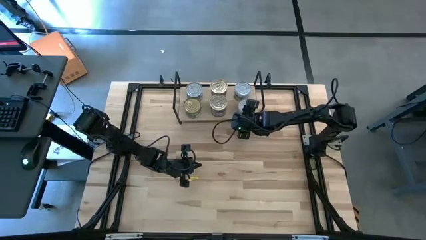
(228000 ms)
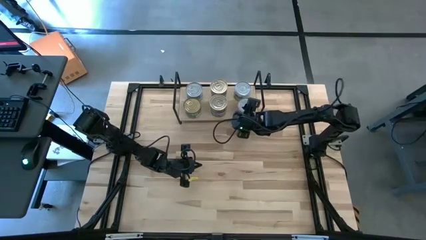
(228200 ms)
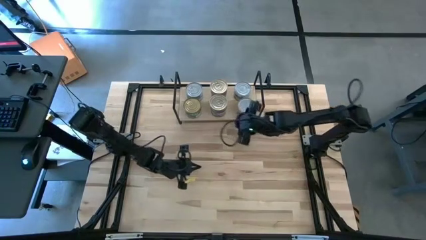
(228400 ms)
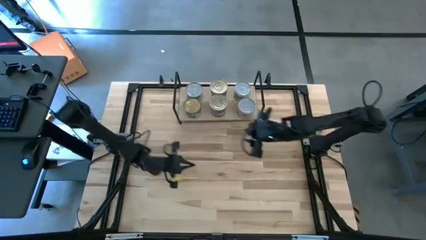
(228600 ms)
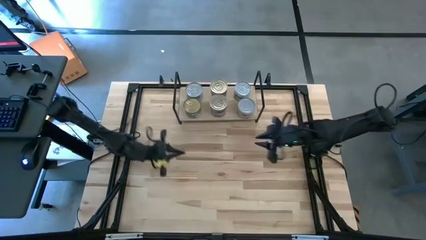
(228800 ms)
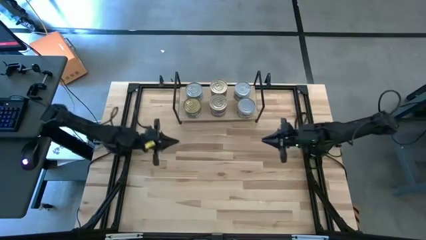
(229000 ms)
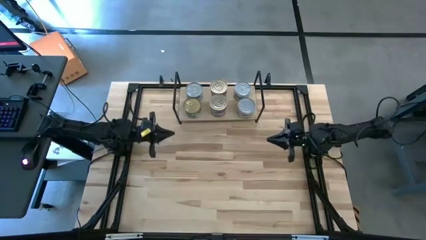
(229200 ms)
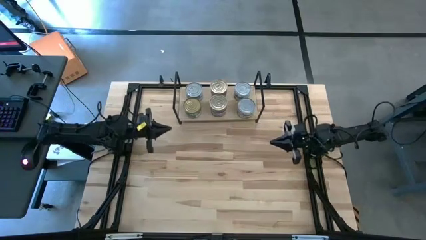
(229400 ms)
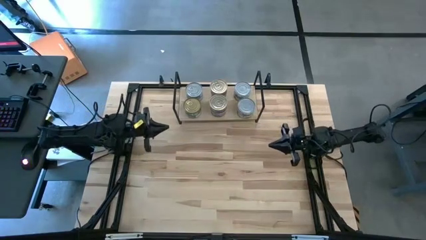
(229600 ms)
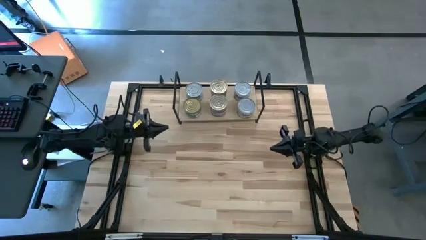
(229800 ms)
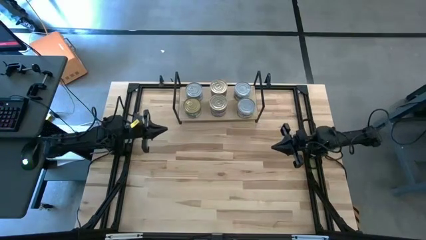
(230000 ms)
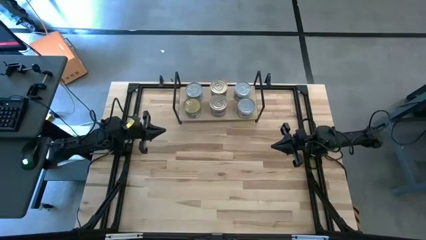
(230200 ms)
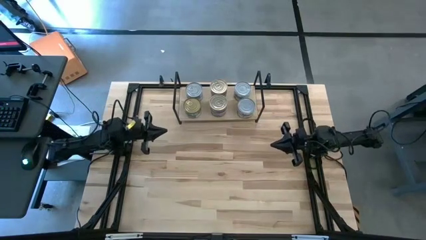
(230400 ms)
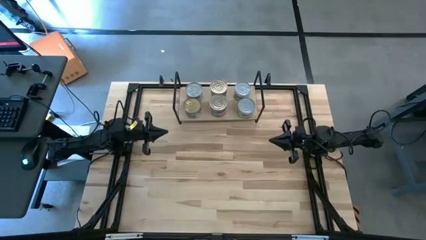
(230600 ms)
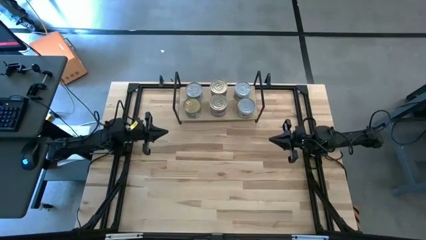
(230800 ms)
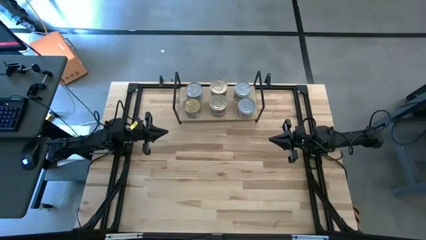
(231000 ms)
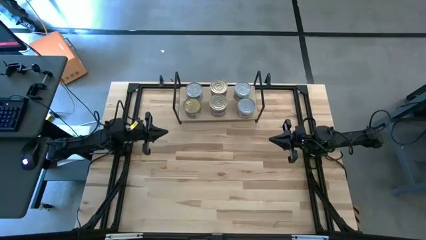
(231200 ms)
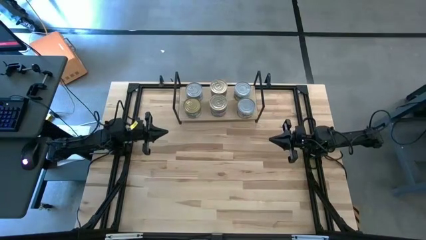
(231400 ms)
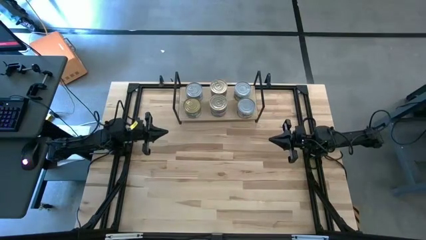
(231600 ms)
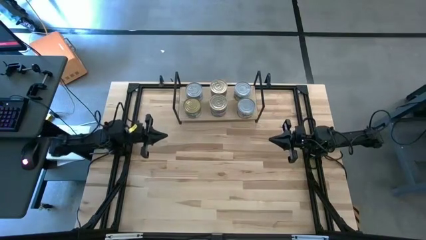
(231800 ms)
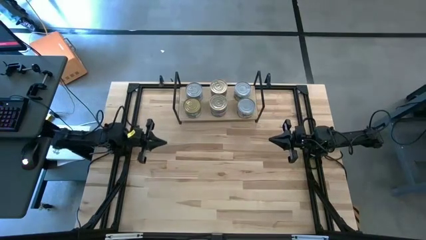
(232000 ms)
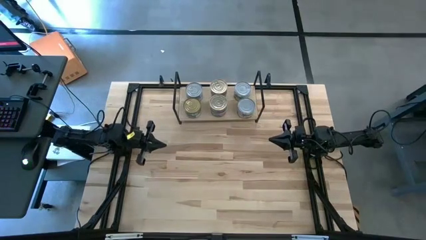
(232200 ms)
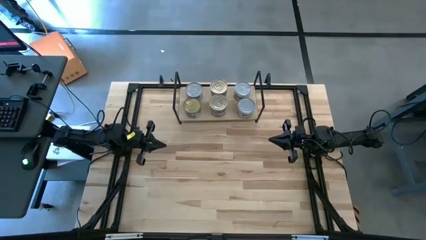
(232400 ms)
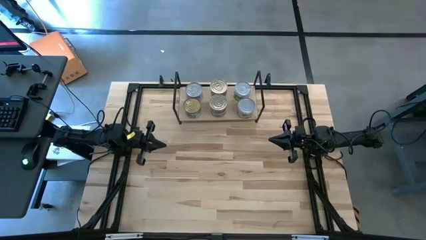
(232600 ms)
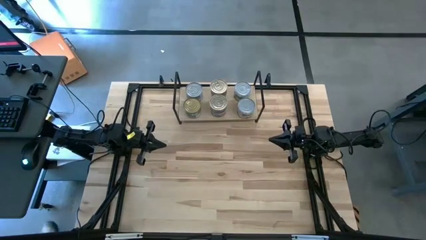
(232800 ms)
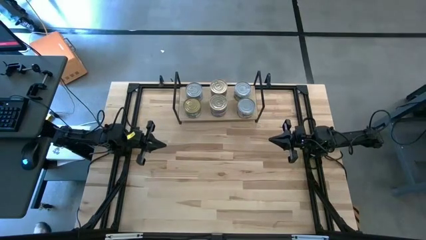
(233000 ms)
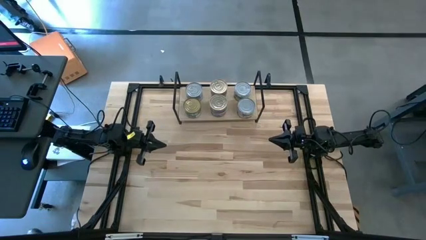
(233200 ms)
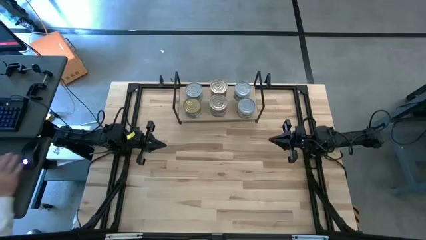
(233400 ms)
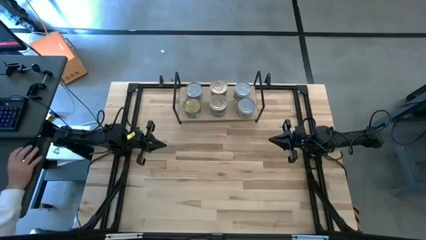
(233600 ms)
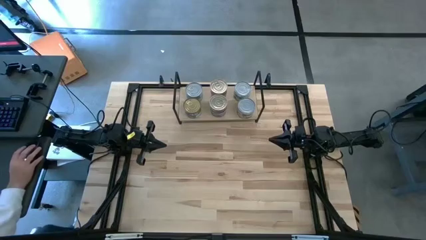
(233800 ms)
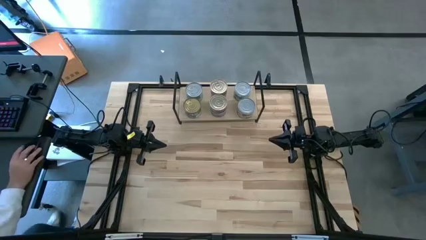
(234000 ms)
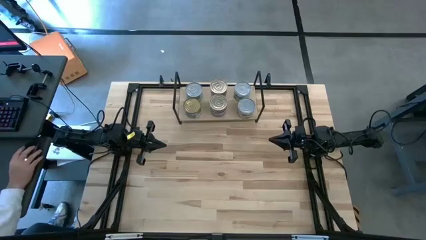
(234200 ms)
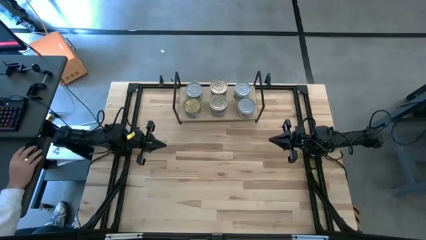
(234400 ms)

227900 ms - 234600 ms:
Task: Stack canned seafood by type on shelf
Return to Home Position

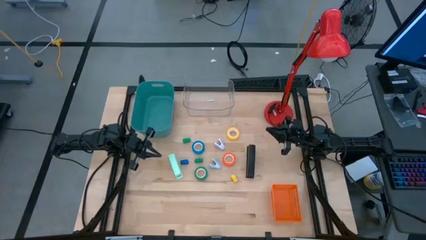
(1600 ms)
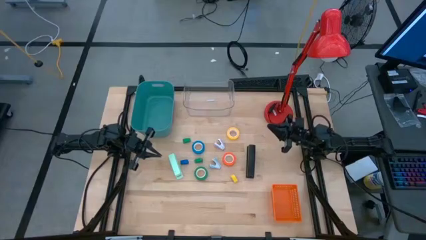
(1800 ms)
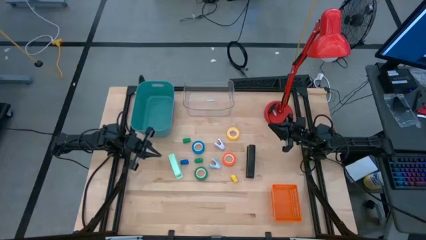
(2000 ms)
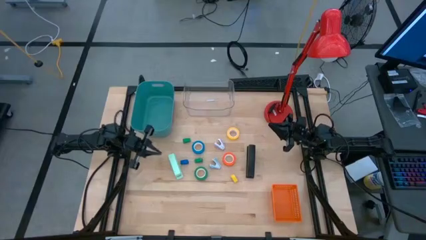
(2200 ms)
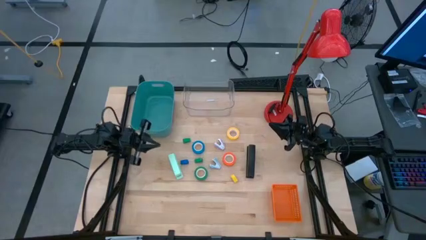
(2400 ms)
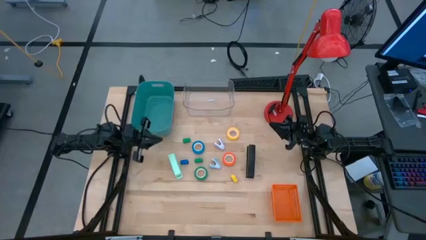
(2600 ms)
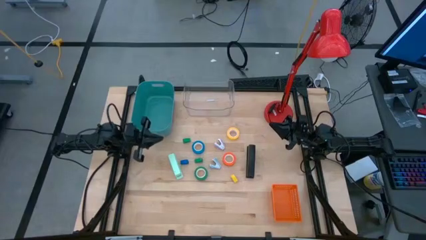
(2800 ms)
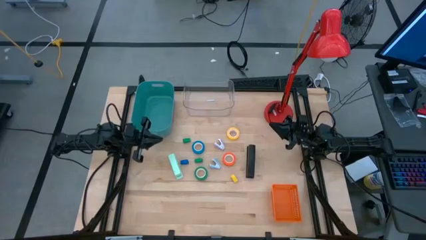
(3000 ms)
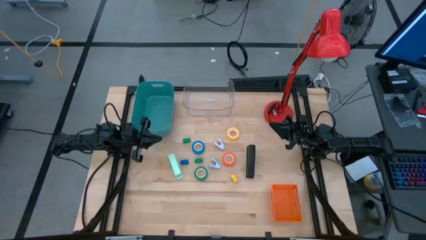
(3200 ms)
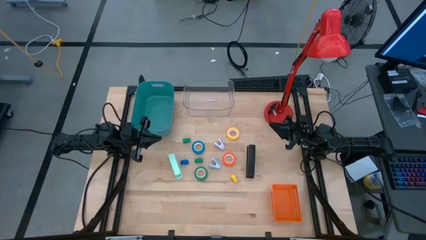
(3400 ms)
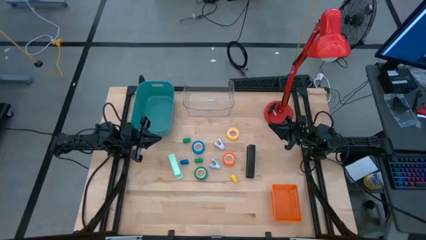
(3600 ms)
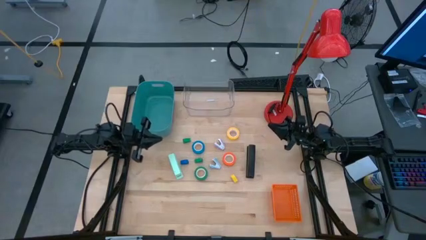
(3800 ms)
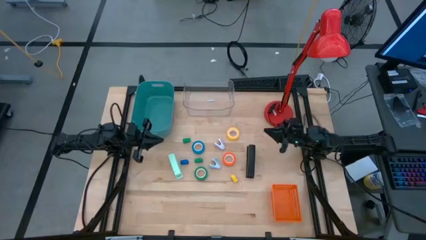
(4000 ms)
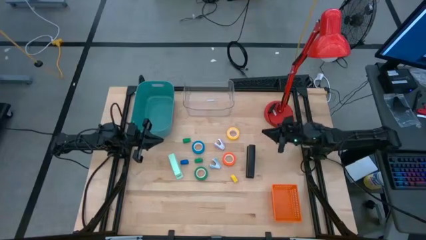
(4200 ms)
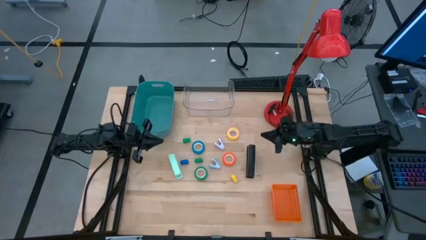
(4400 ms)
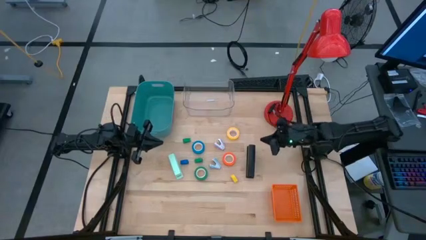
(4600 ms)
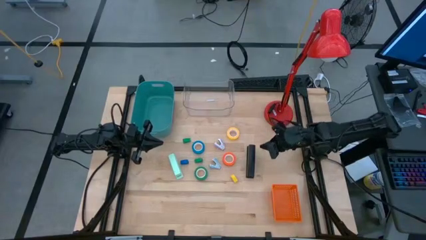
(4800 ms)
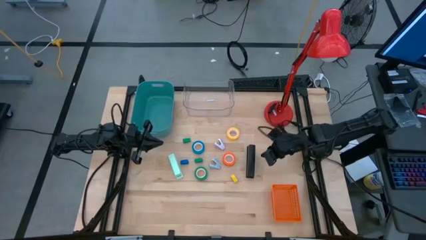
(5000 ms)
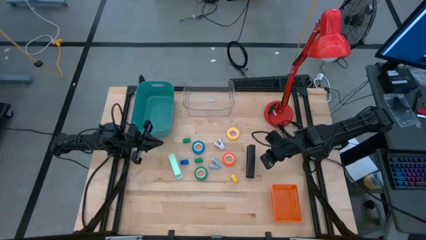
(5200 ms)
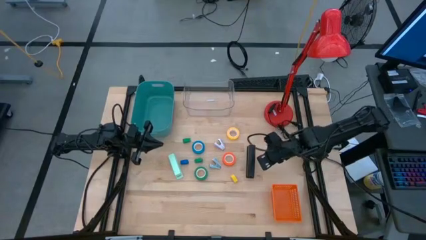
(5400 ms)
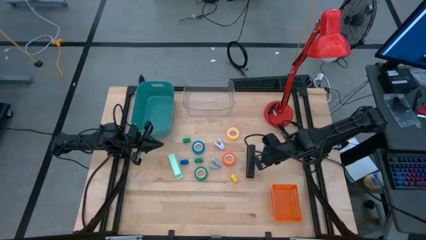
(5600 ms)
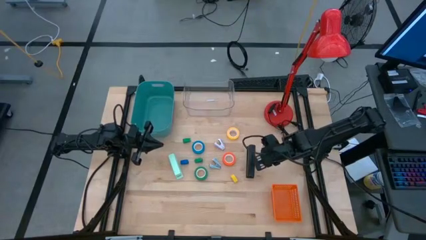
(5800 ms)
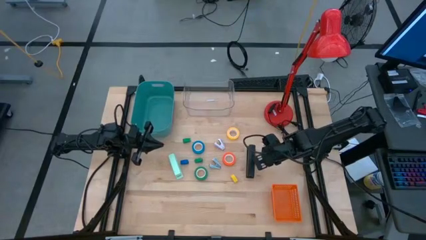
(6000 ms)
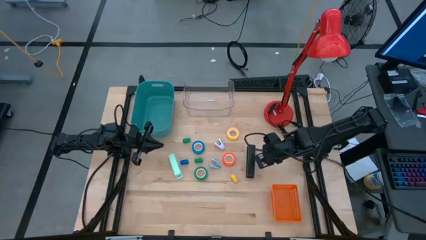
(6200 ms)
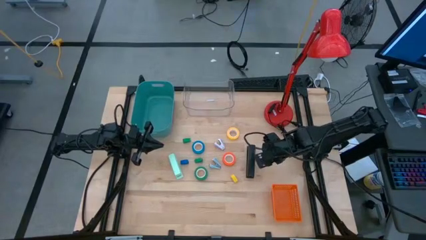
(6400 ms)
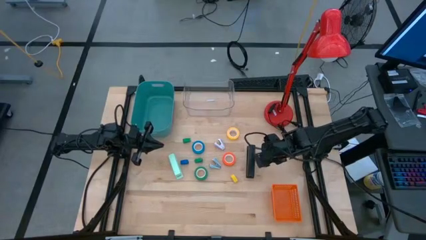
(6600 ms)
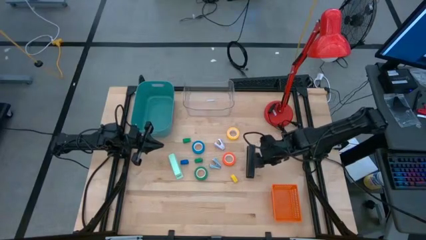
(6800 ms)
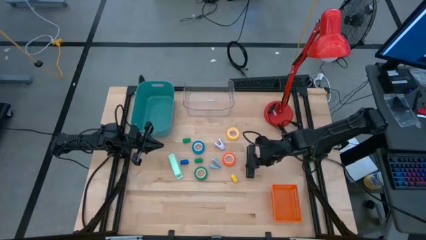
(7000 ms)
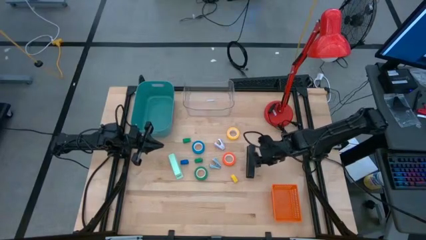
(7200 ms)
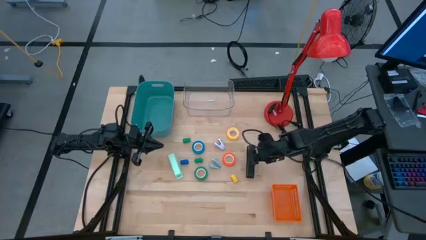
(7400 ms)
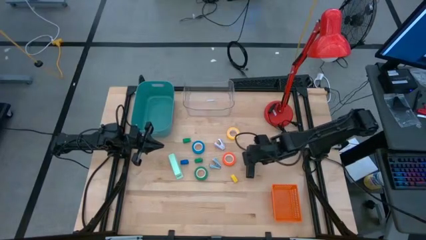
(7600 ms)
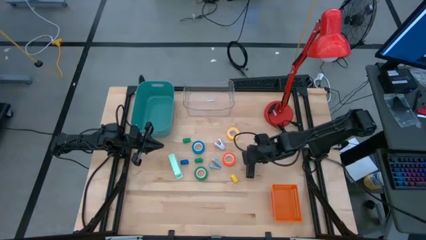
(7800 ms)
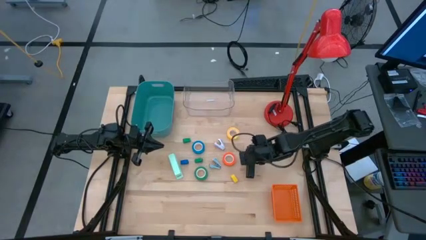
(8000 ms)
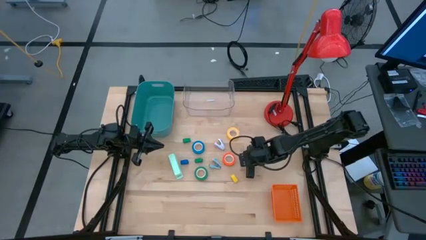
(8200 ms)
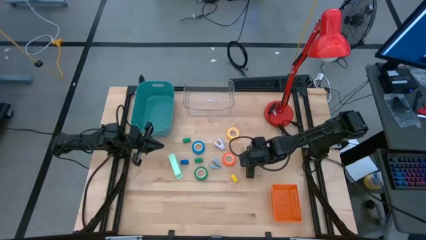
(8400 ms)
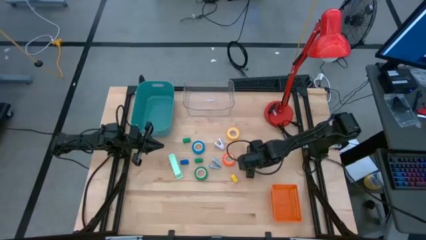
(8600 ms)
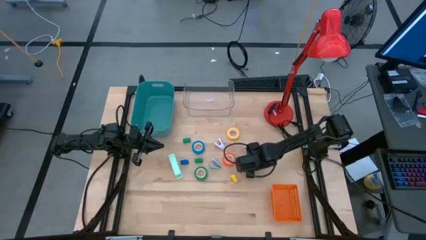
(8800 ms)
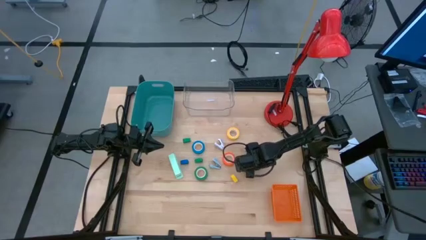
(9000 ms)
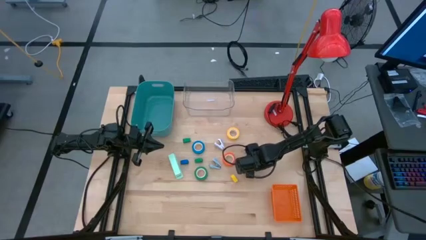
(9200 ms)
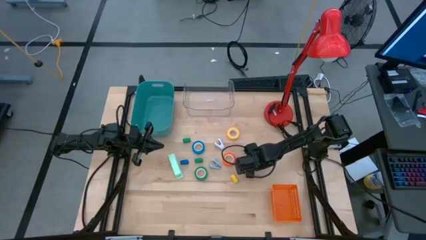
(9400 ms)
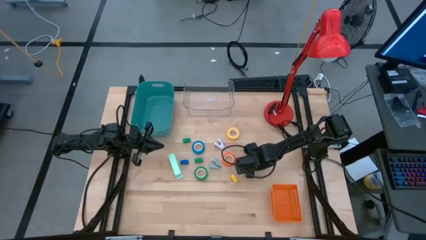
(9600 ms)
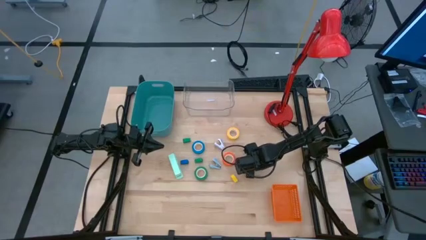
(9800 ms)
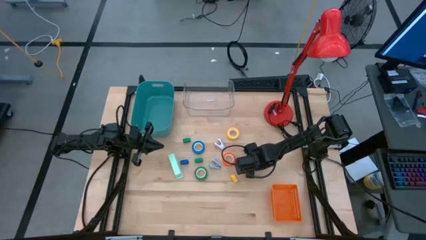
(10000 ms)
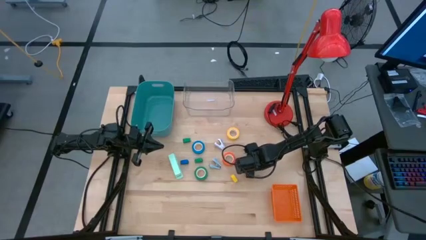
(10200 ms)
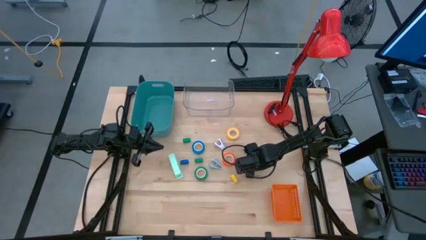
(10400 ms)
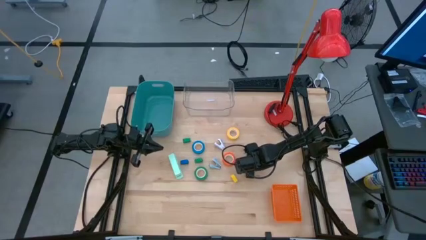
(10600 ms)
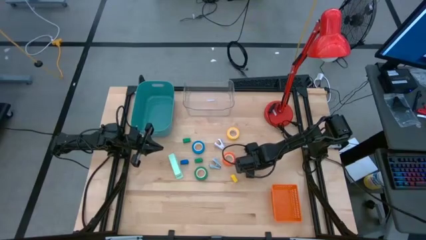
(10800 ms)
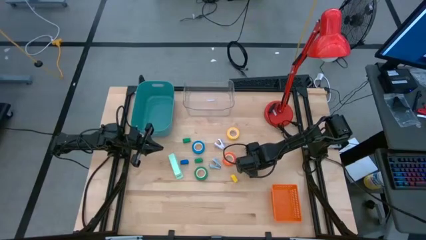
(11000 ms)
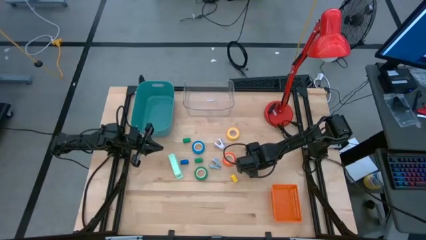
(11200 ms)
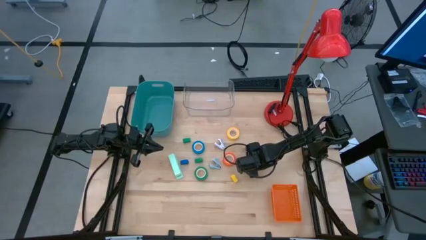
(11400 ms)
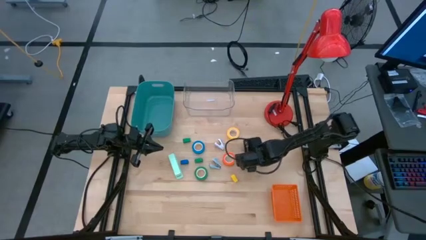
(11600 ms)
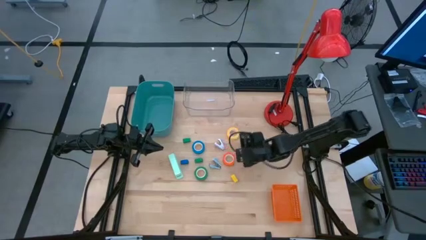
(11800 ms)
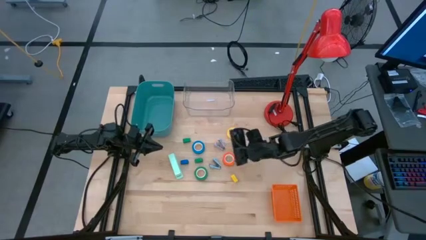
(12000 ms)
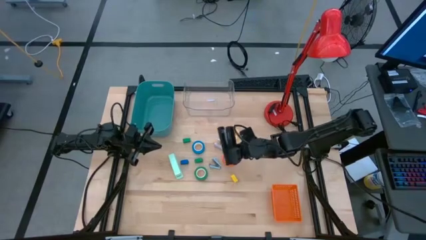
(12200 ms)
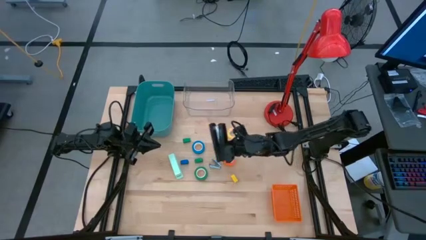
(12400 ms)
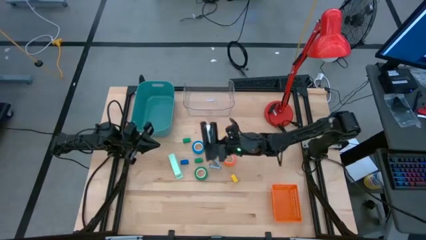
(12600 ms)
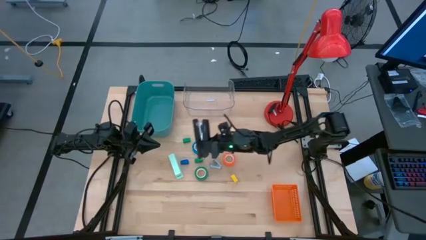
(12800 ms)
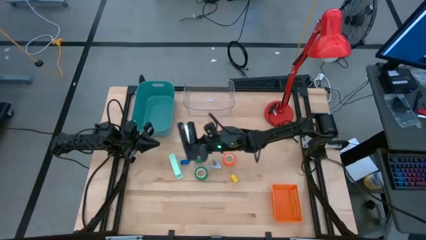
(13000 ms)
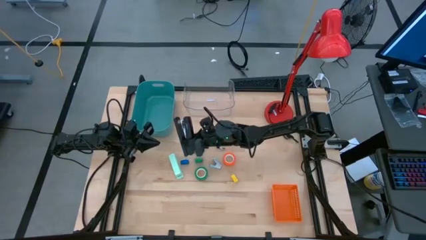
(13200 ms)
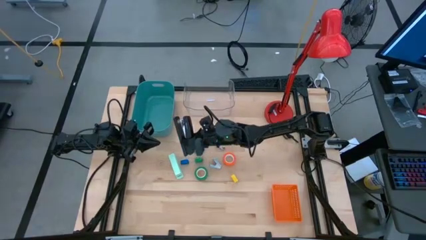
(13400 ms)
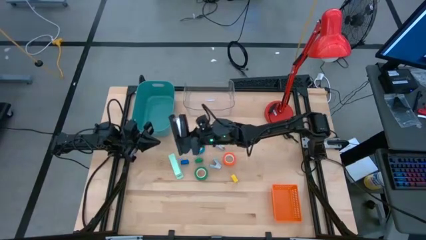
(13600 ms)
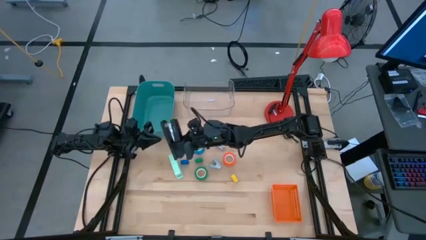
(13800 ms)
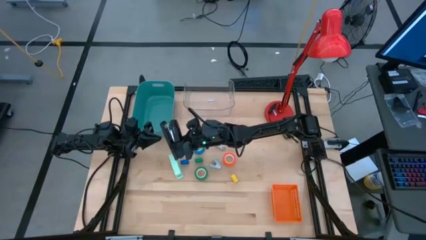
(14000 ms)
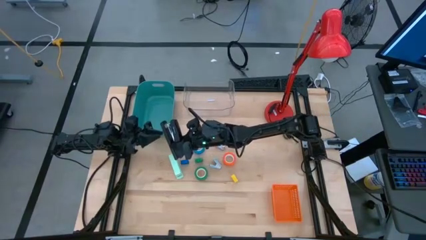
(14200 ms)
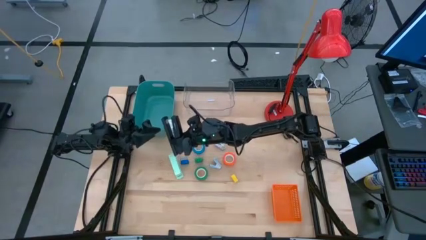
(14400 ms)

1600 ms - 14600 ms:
Task: Pick and place Stapler, Stapler remover, tape
Put the black stapler into the green bin
